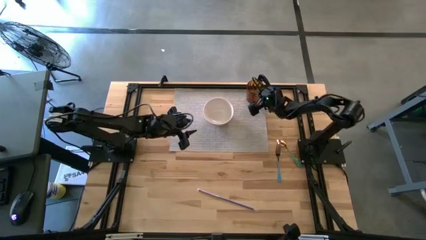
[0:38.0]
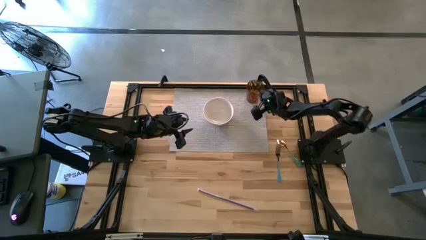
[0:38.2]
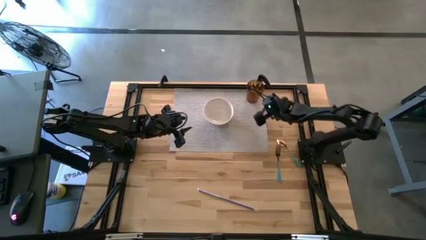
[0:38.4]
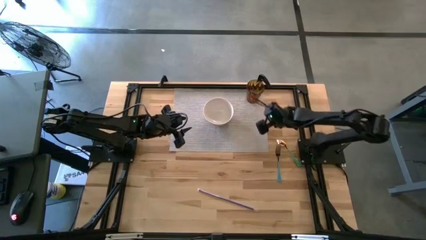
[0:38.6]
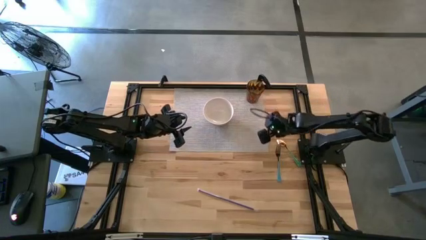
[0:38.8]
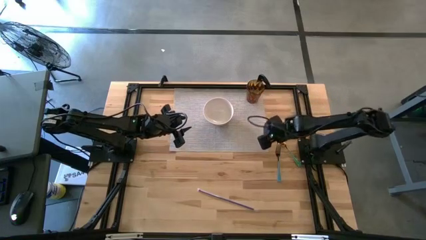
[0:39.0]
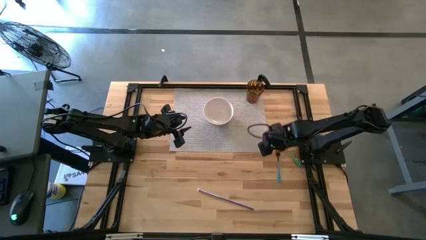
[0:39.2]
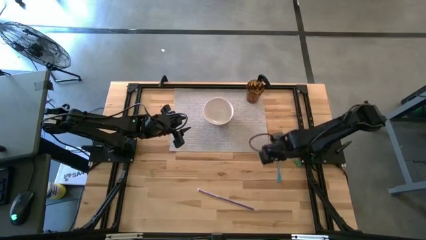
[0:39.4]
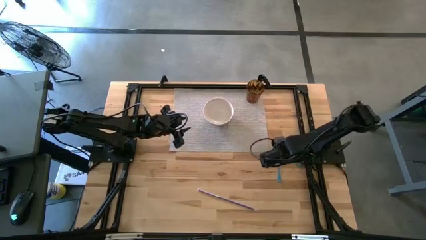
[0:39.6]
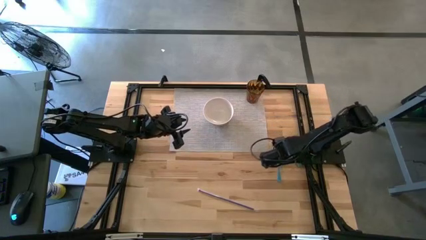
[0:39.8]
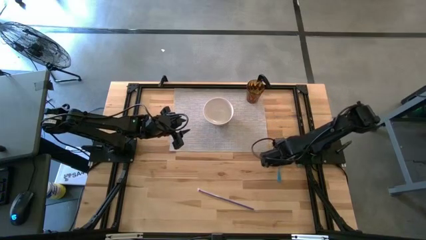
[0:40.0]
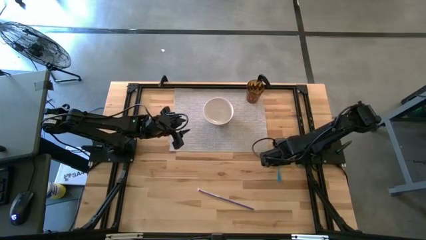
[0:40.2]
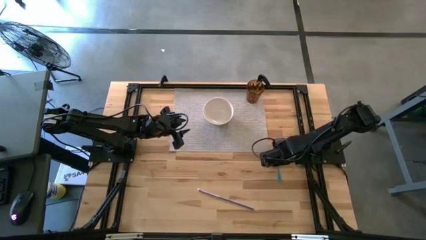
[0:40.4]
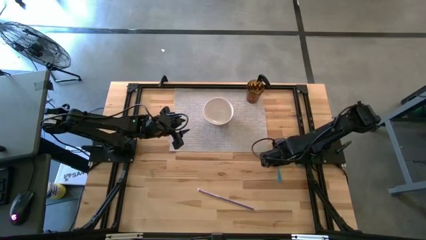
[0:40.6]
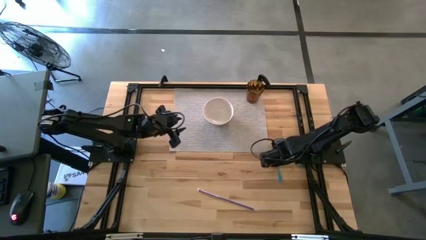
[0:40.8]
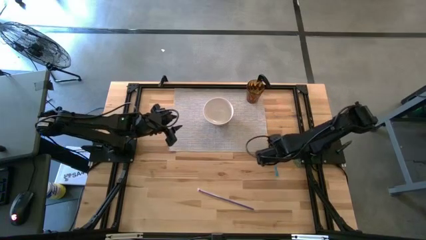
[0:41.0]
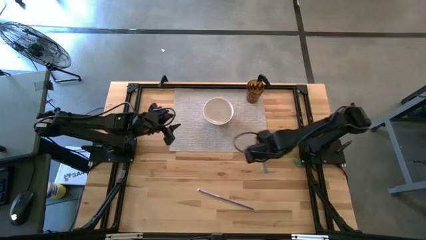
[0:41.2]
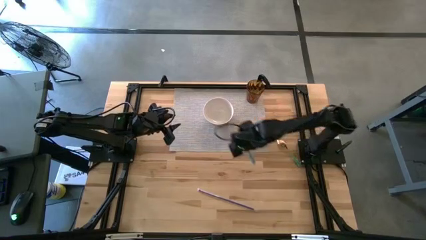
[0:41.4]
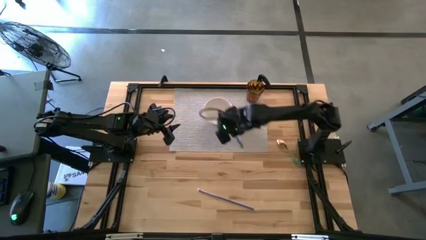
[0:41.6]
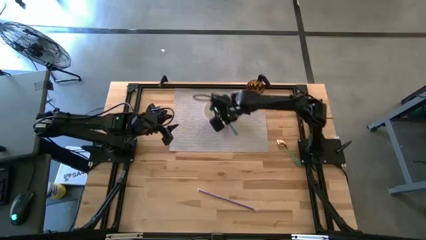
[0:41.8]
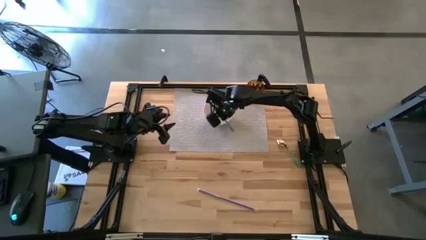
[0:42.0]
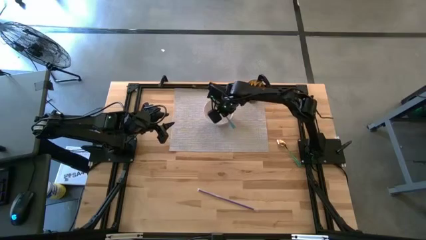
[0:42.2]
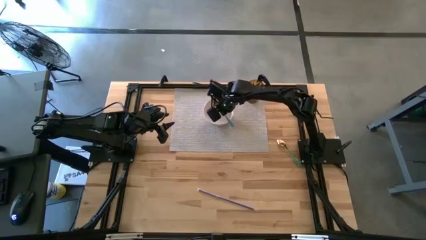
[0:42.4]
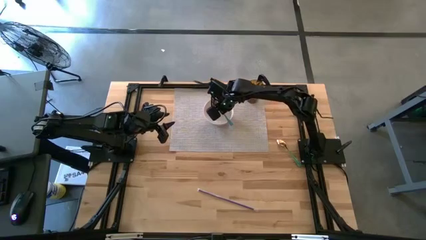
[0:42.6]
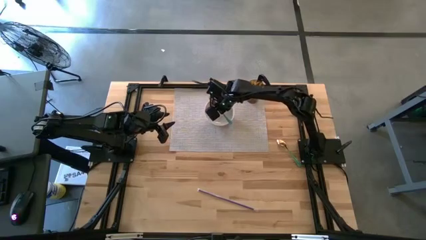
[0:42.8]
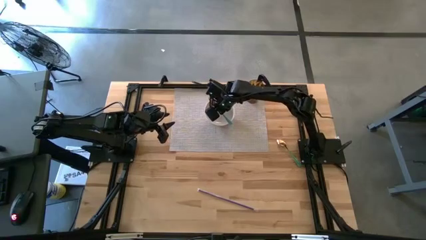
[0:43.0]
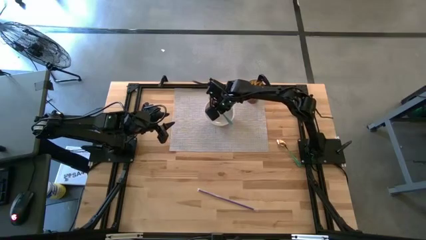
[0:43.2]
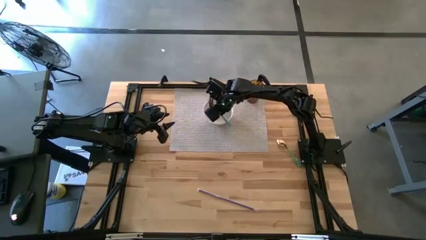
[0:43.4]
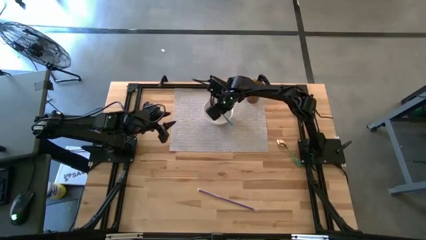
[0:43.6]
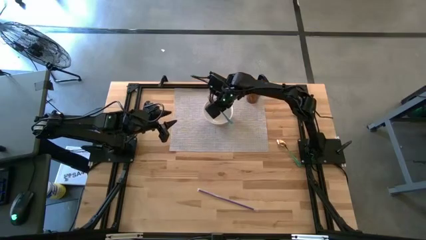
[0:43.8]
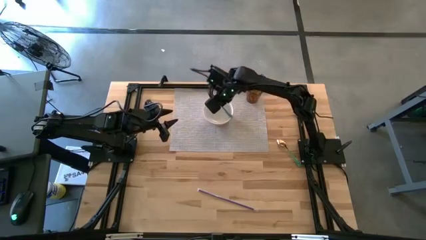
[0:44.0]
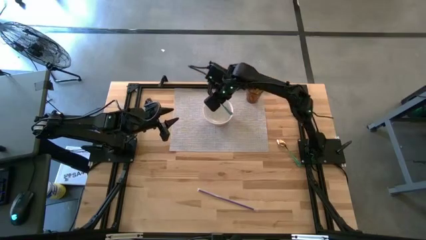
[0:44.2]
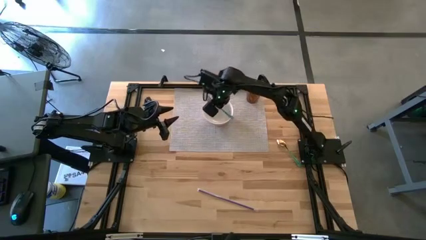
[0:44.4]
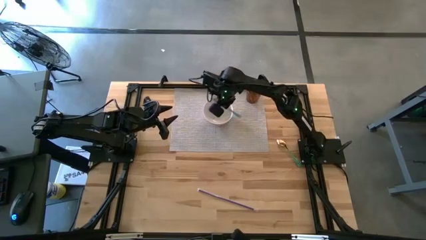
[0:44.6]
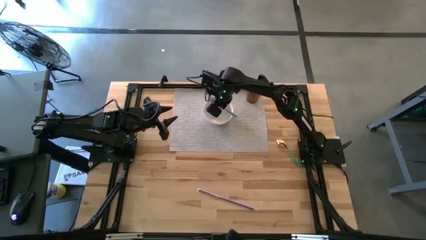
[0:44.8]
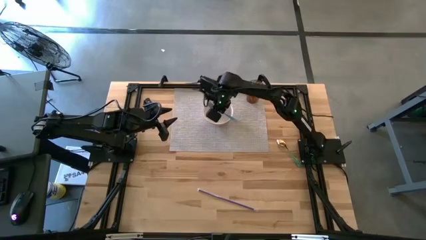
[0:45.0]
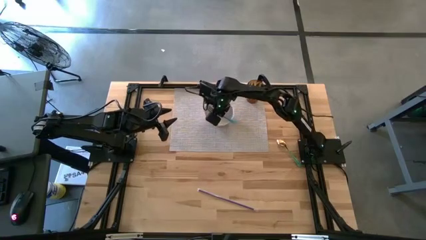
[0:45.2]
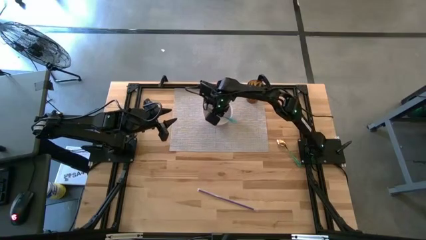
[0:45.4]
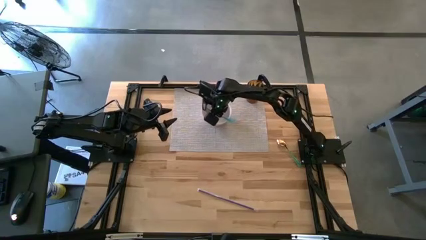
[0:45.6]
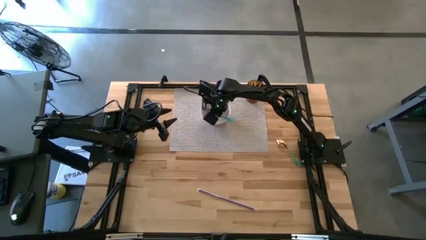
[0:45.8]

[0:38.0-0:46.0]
Task: Pick & Place Utensil
Put the blue fork into the white bowl

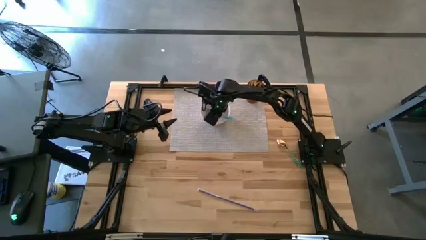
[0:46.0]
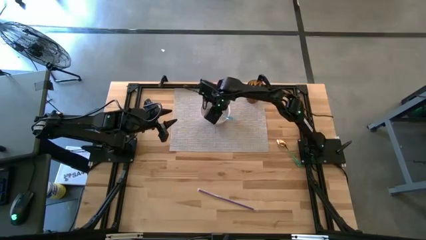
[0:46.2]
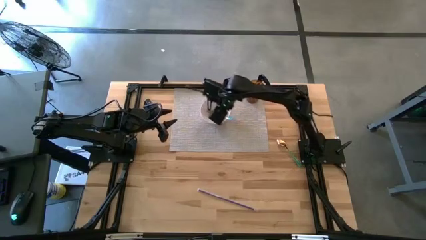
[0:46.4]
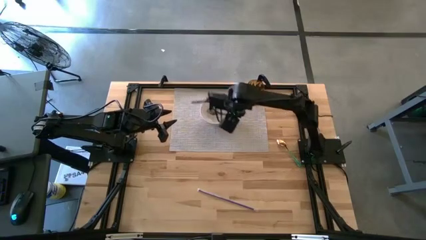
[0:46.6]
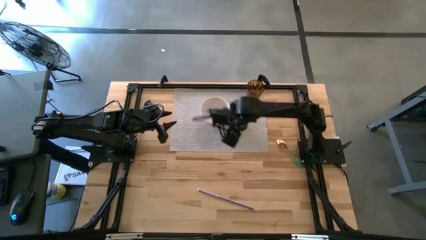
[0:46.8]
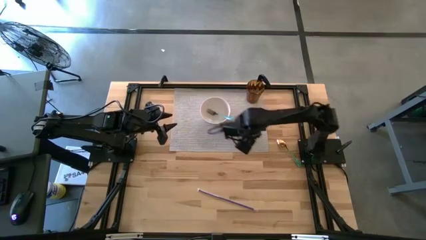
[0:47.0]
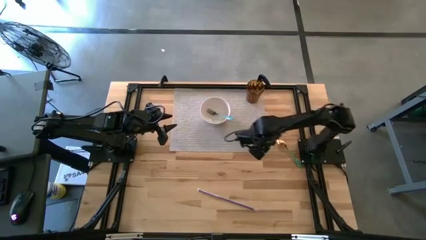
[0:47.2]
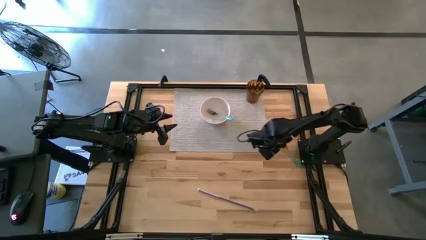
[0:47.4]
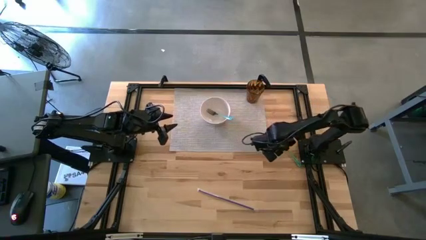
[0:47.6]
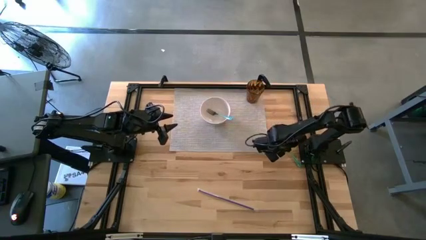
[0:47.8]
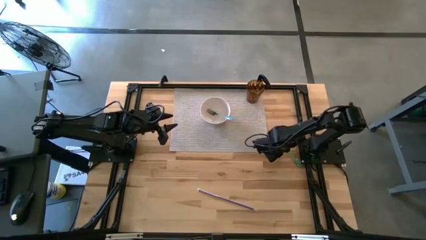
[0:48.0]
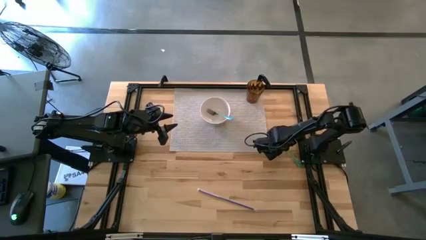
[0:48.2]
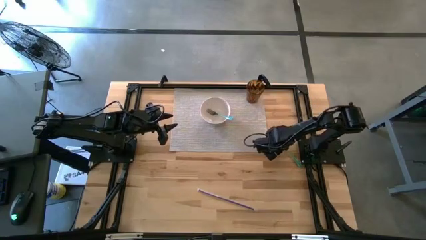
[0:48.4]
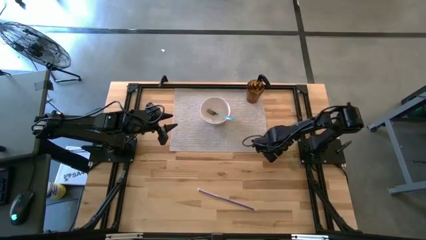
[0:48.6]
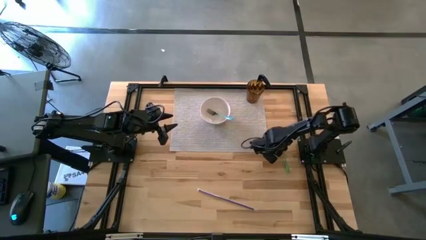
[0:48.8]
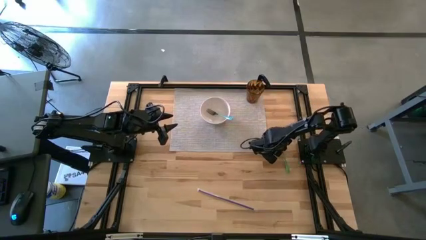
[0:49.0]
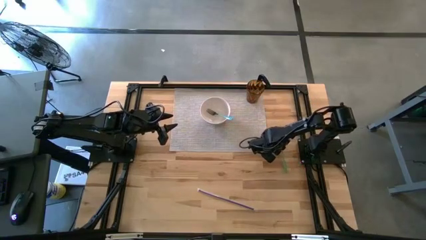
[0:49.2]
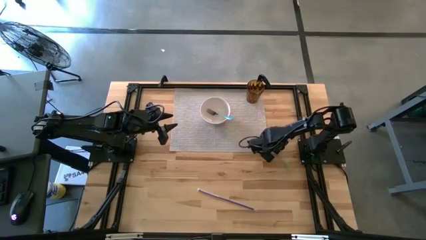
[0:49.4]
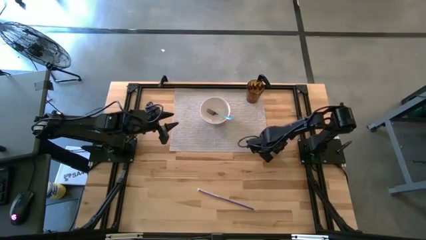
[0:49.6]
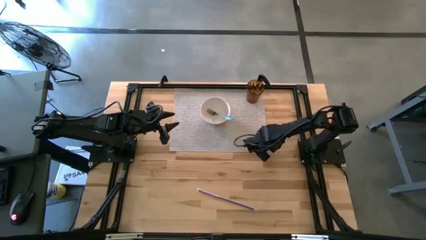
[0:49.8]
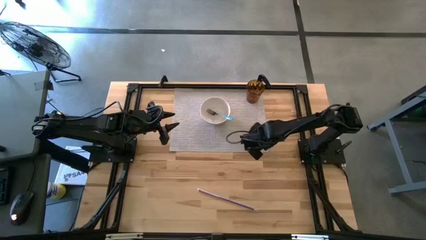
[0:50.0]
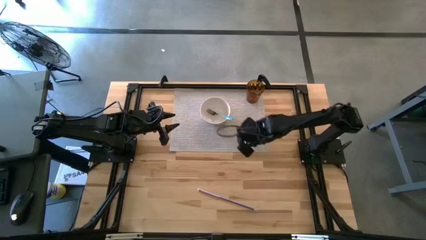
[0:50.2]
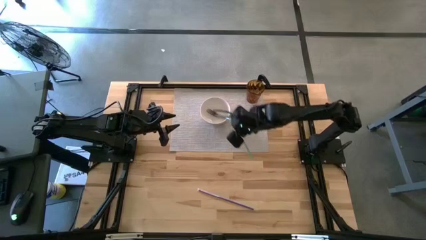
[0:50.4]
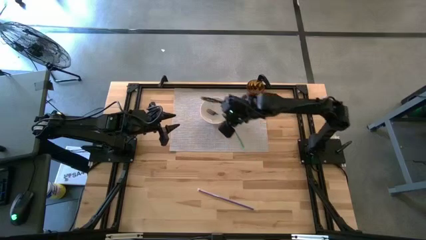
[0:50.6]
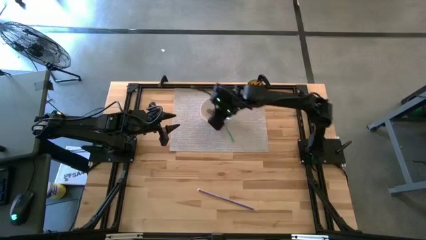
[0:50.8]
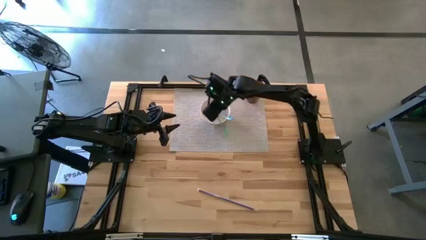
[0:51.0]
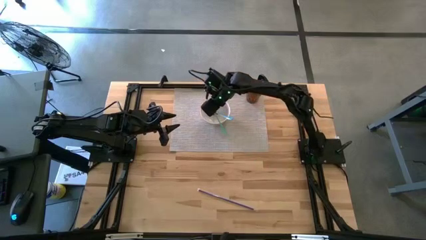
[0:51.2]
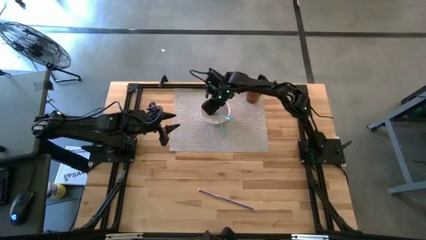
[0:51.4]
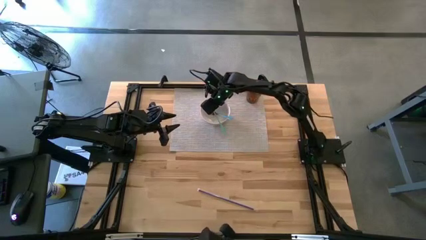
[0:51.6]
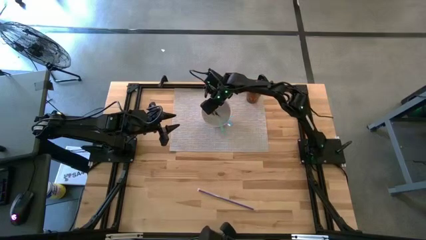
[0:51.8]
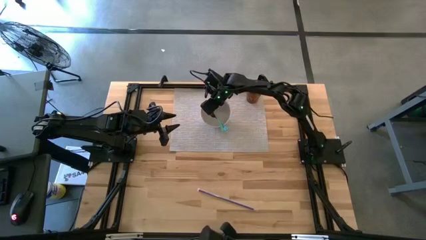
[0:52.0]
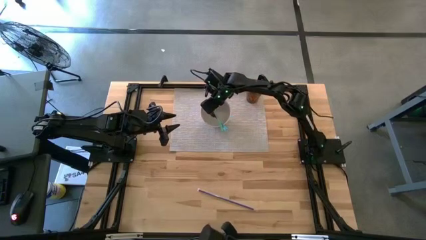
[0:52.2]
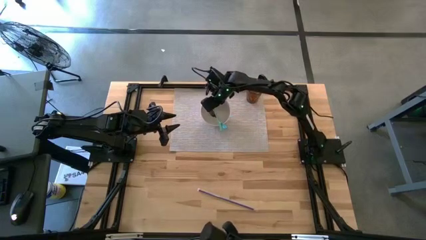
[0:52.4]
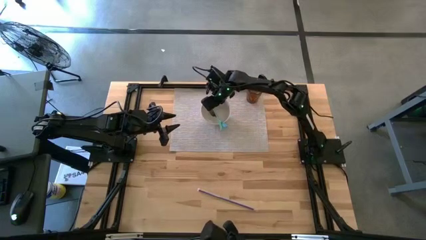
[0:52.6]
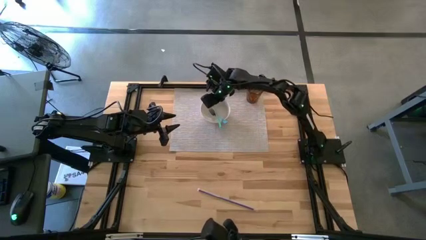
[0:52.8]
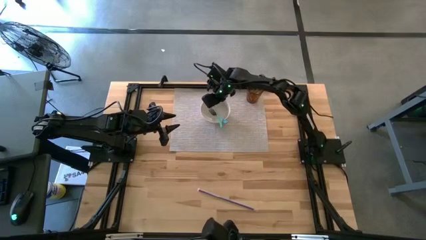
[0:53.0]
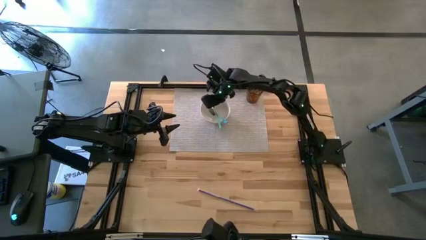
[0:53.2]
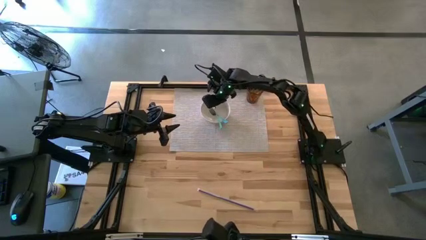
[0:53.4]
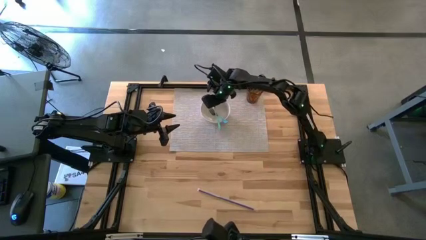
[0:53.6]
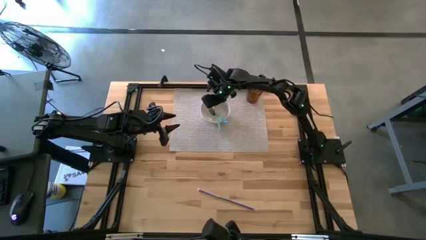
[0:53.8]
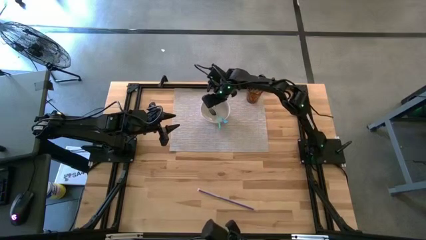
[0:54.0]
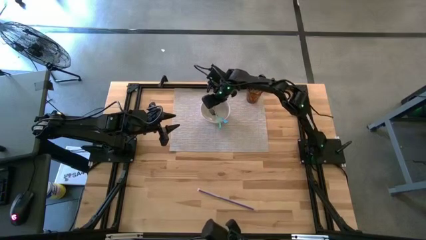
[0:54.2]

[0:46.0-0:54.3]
Put the green spoon into the white bowl
